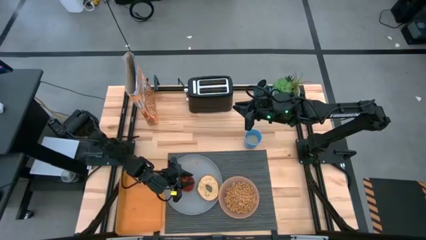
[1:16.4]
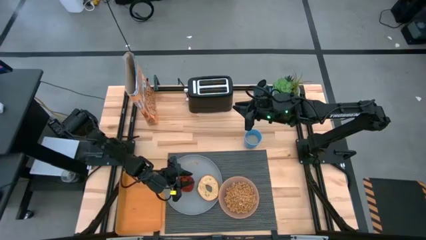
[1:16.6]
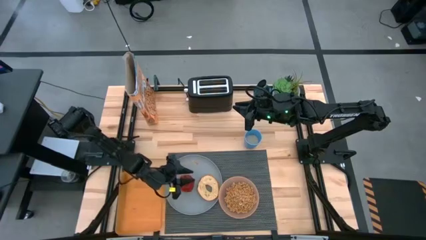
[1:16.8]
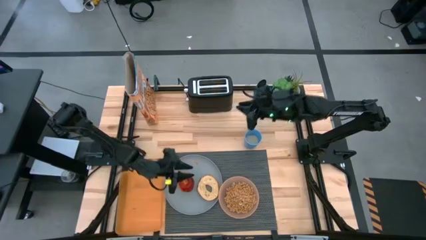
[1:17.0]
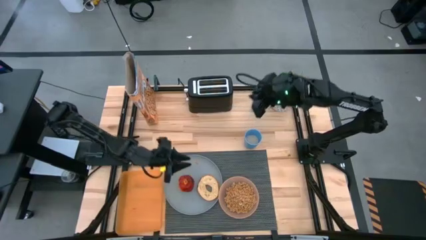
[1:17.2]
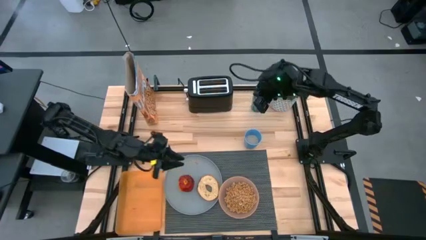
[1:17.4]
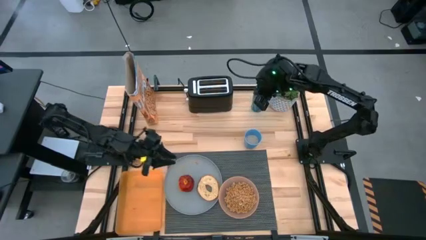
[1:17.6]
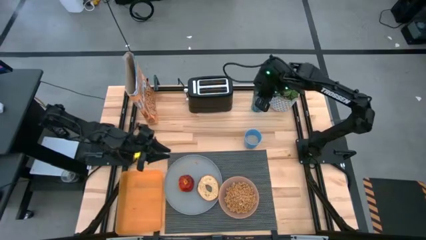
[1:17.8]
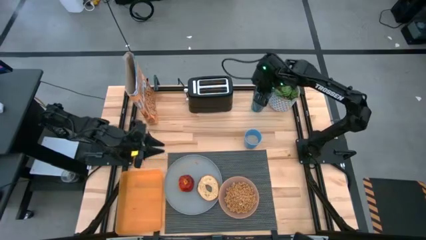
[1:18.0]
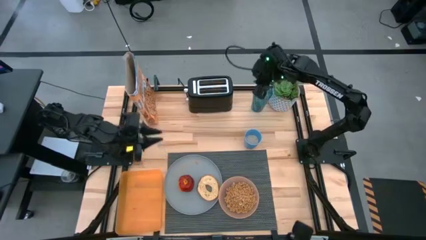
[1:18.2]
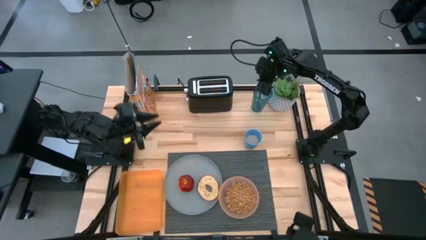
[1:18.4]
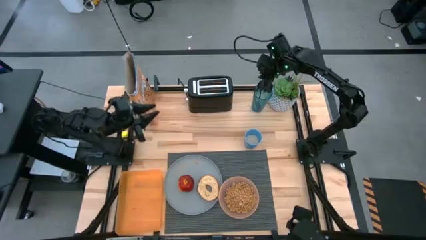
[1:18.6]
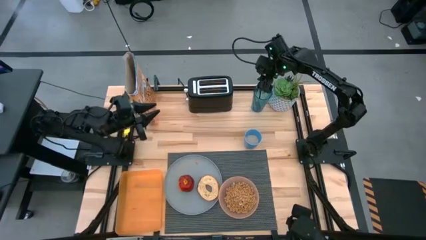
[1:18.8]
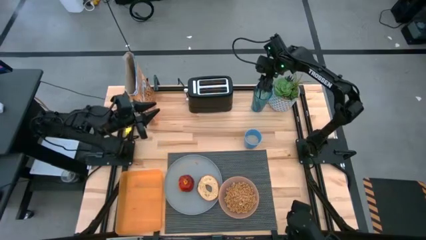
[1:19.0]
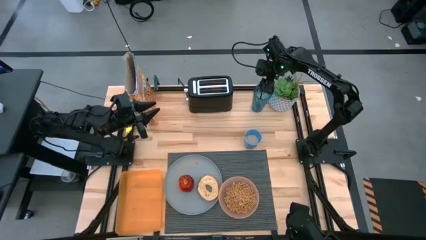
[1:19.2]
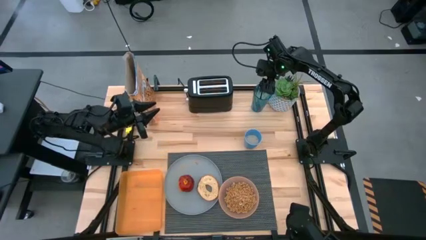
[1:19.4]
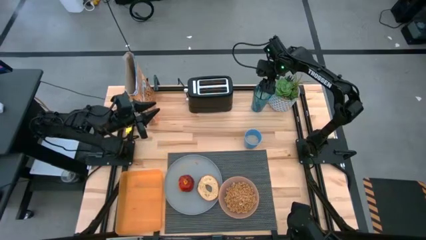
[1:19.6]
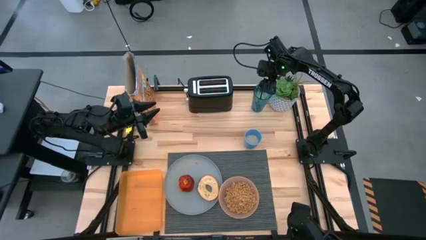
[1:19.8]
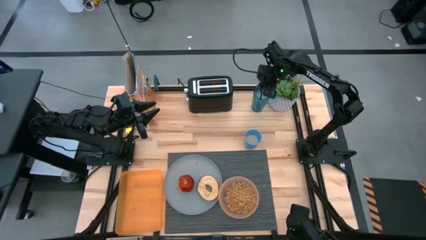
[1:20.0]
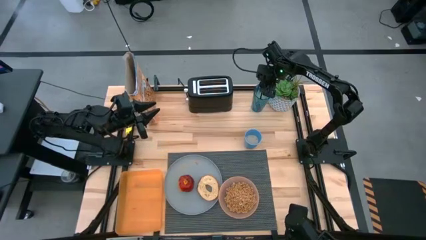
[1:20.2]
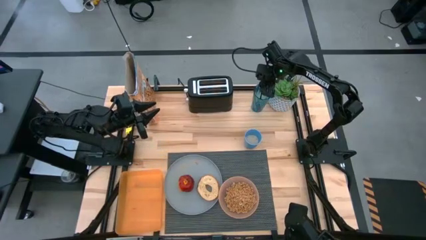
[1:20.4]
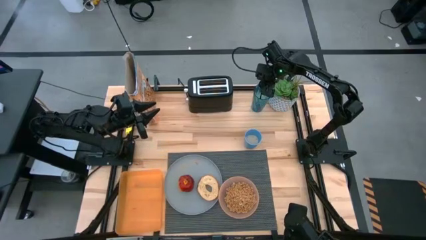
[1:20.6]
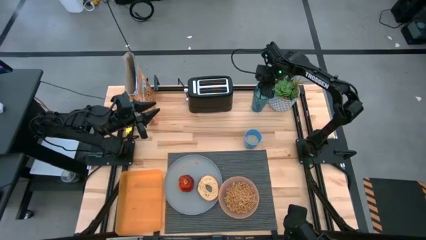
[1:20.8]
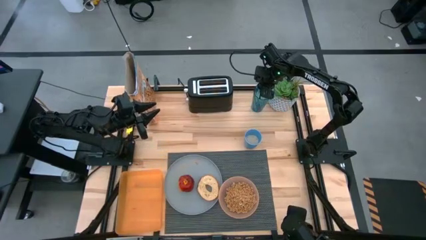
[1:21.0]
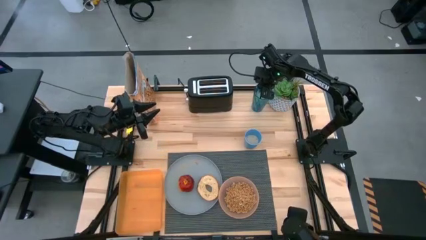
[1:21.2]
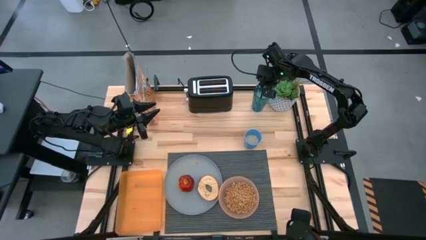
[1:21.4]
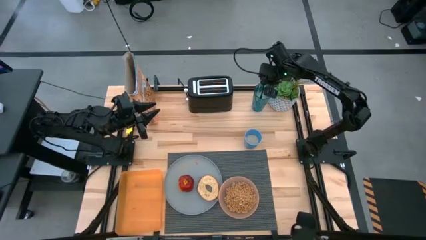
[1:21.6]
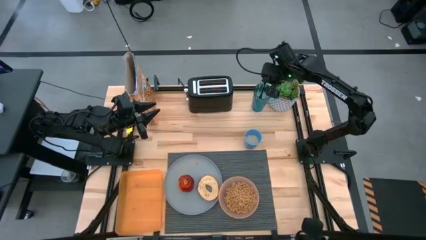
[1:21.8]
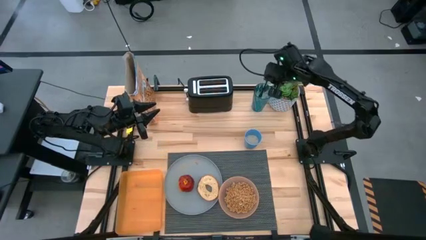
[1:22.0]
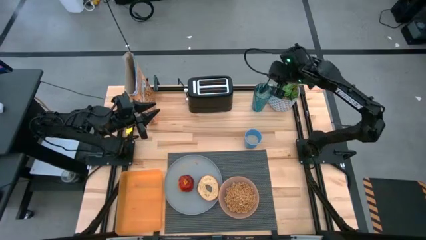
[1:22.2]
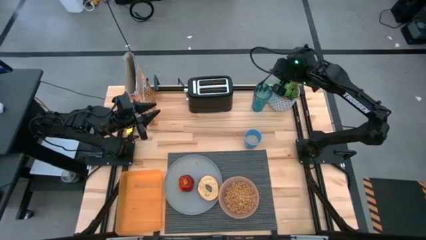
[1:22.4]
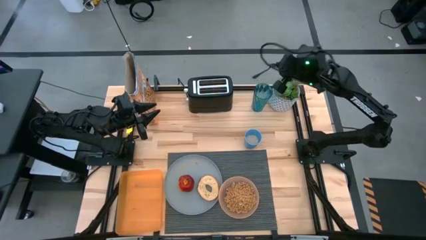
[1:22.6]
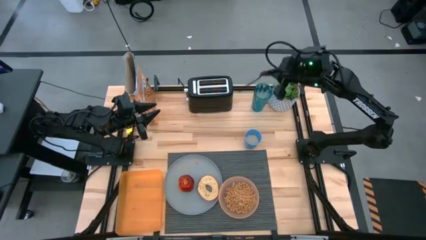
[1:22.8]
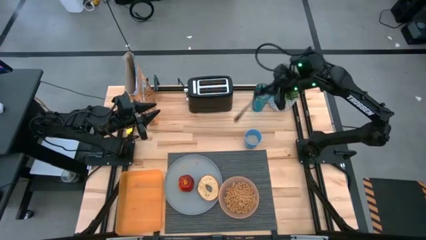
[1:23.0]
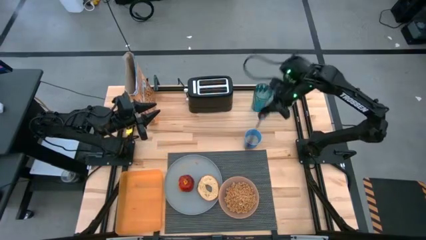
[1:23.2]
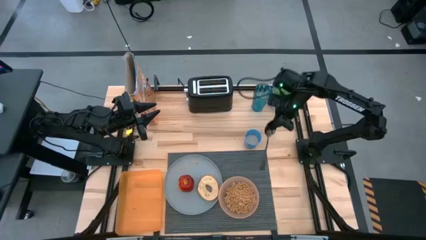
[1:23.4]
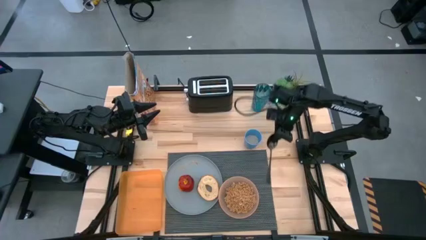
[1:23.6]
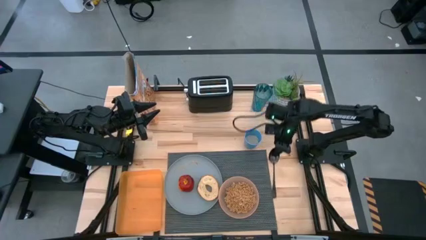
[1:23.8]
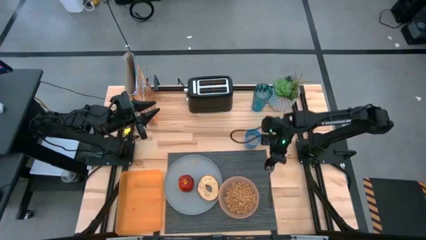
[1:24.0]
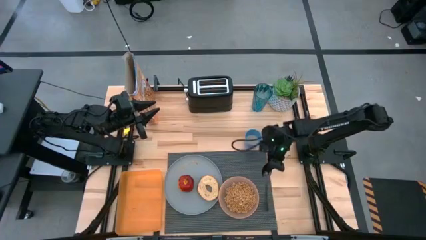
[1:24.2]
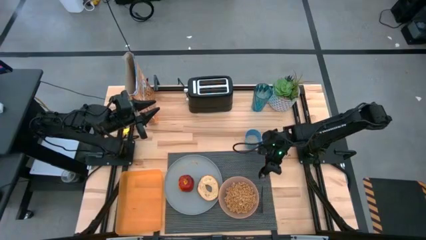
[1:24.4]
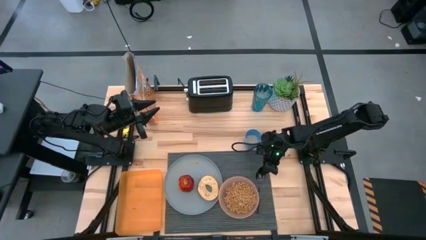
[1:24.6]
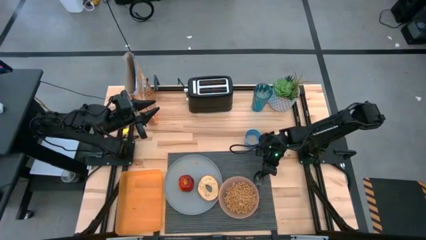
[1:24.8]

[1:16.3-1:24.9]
Task: Arrange a breakfast setting
Put the black spoon on the gray placemat to the right of the orange bowl

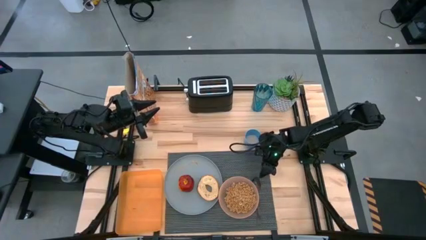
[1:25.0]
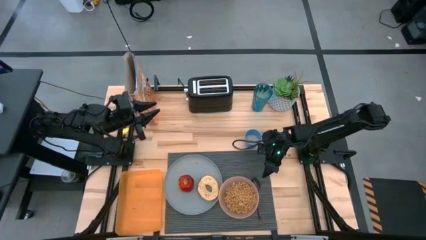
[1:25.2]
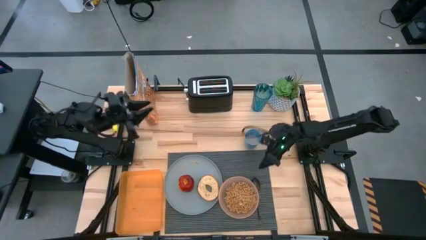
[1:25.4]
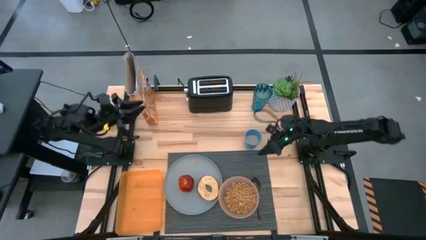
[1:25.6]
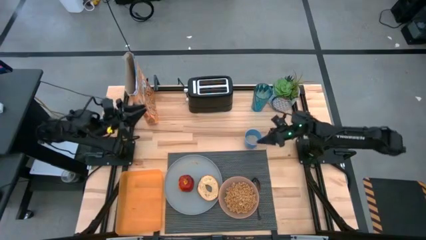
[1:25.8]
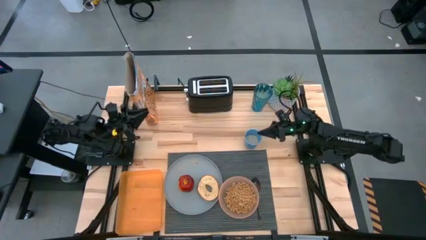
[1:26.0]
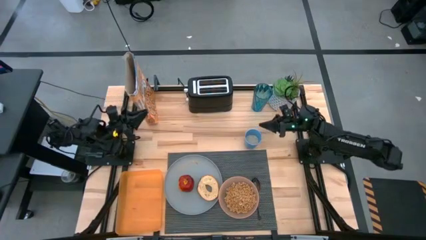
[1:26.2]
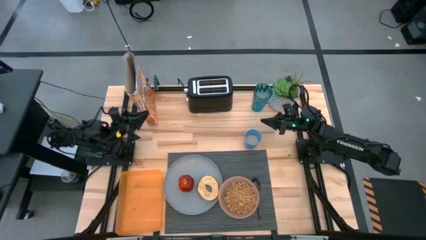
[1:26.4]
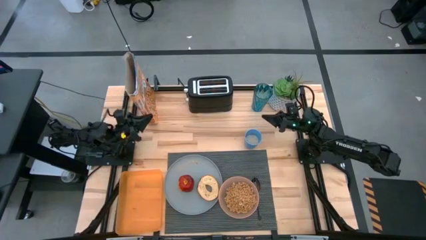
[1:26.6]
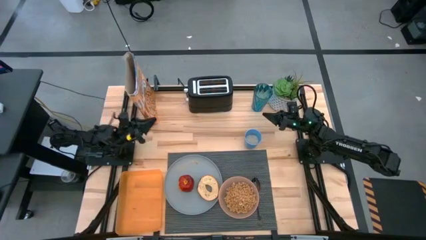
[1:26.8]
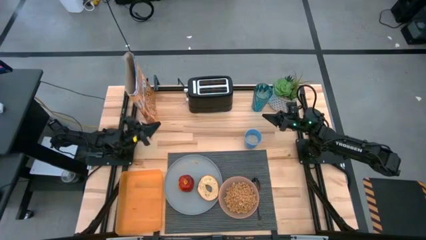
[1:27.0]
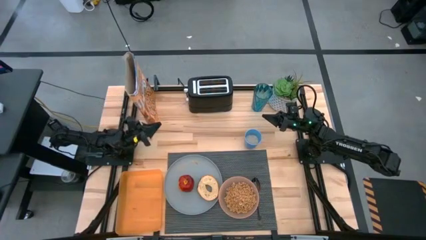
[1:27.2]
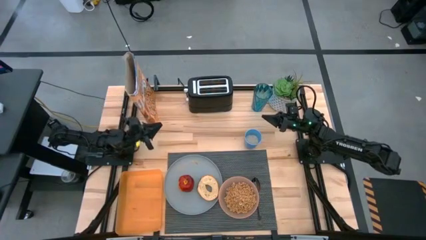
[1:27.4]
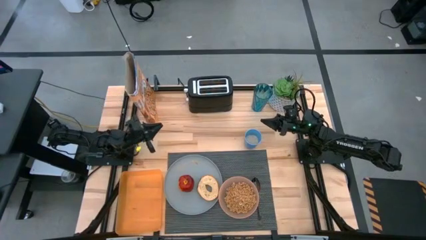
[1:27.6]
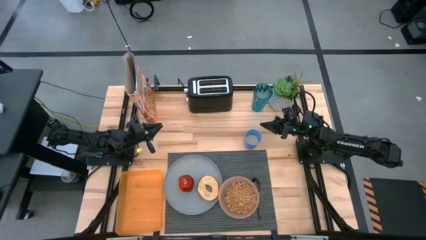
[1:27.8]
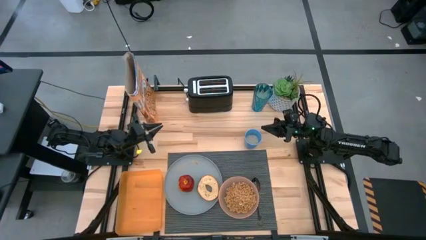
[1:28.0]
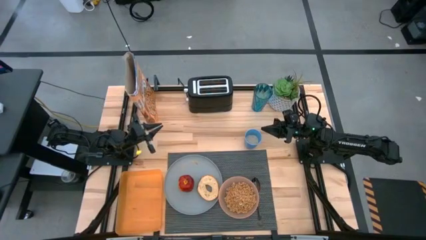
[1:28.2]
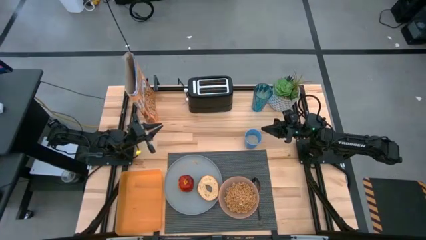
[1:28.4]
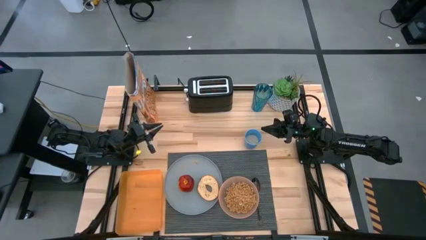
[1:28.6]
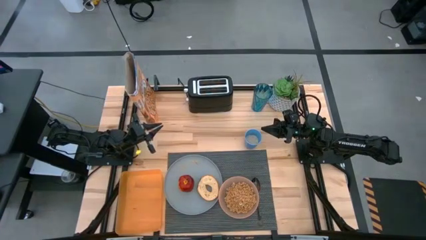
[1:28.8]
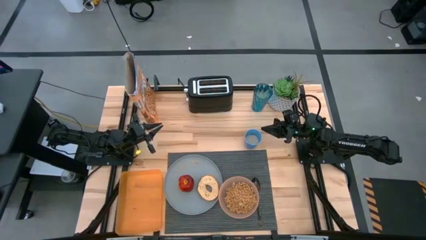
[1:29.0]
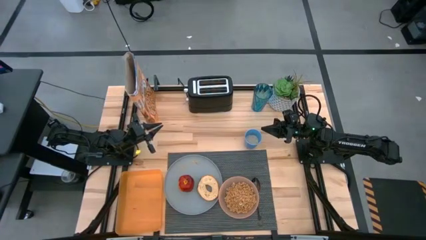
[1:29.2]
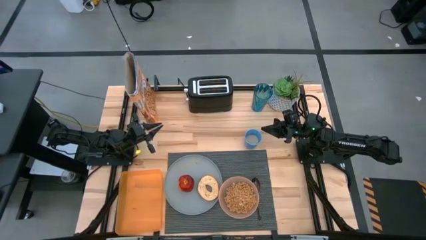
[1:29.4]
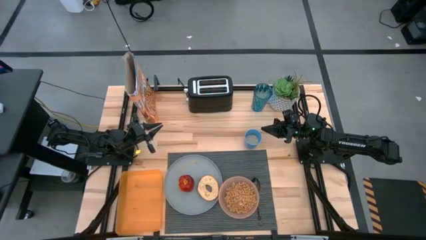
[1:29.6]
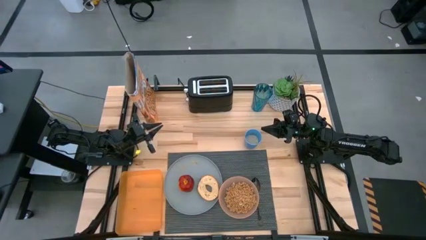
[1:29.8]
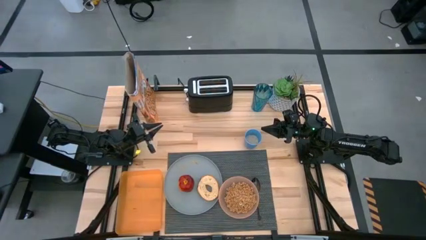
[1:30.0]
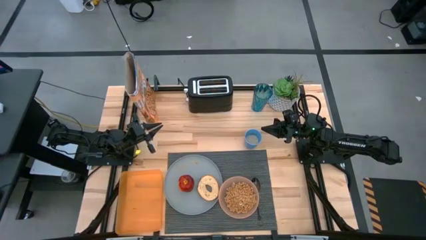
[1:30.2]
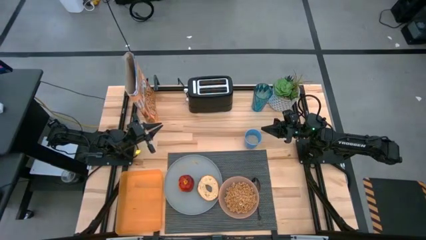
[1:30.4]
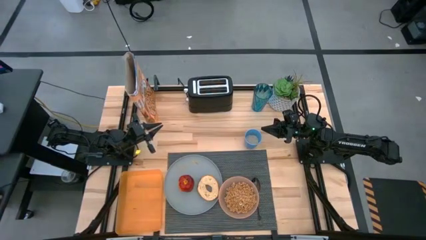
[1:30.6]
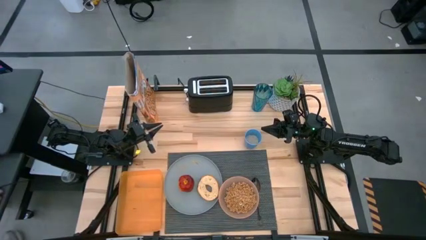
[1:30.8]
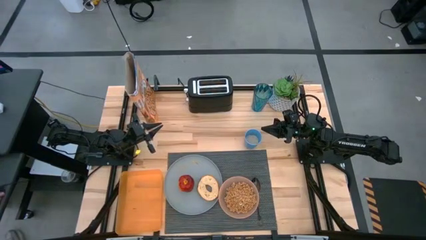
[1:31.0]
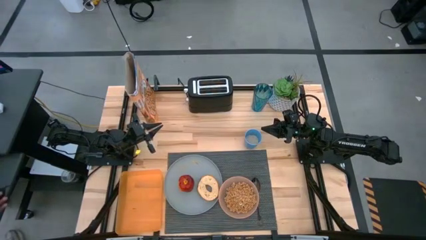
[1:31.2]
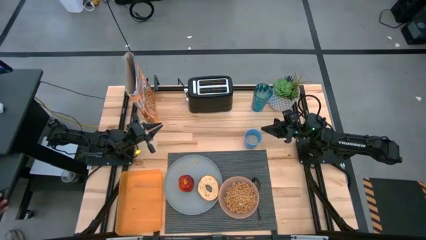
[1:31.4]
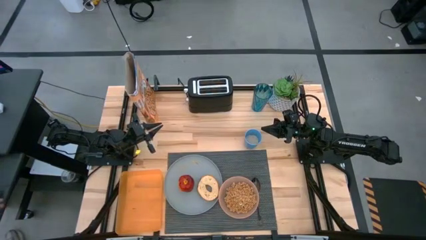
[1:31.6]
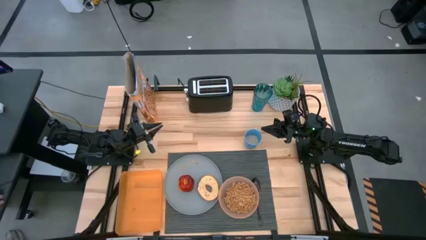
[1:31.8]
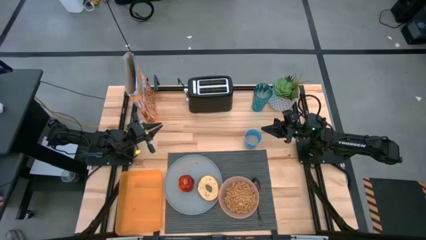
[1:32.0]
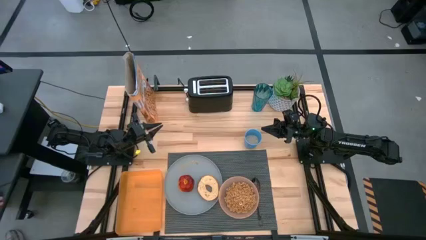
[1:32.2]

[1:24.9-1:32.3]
Return to Home Position

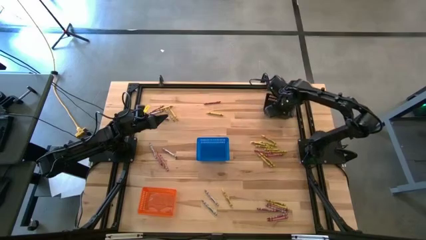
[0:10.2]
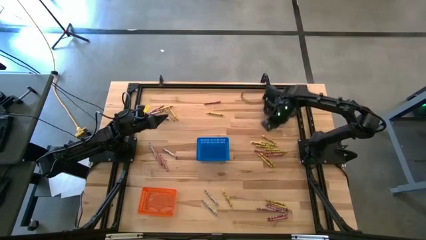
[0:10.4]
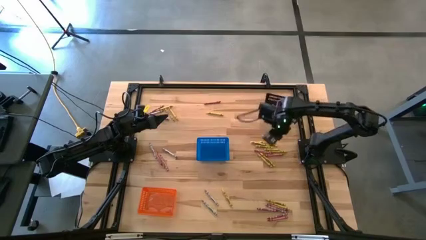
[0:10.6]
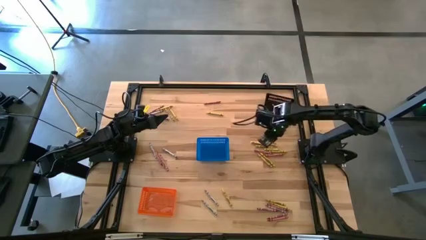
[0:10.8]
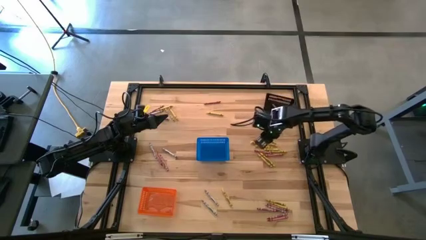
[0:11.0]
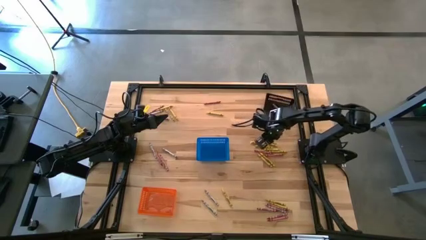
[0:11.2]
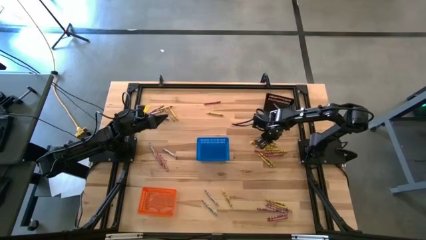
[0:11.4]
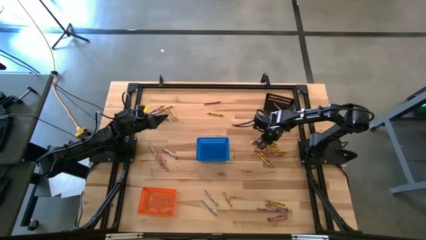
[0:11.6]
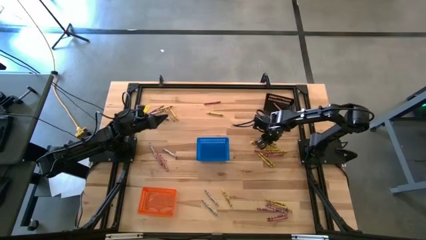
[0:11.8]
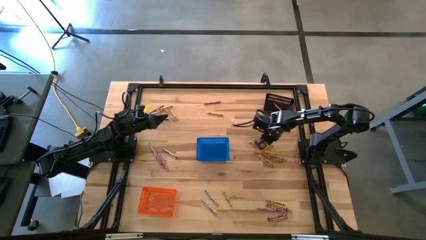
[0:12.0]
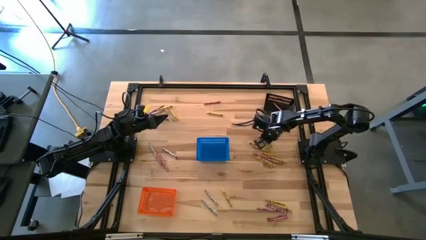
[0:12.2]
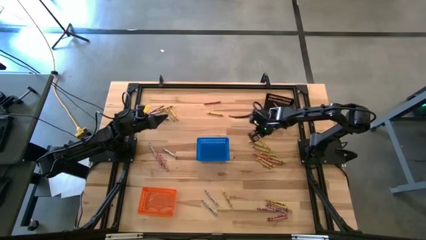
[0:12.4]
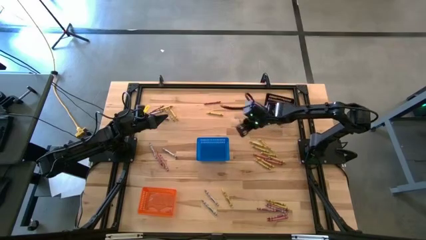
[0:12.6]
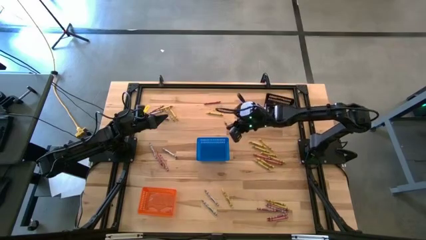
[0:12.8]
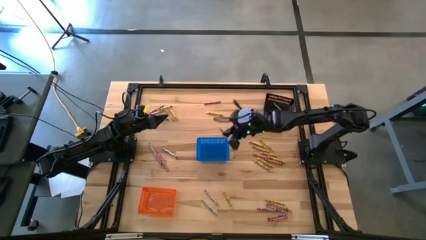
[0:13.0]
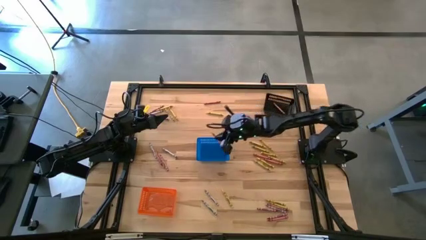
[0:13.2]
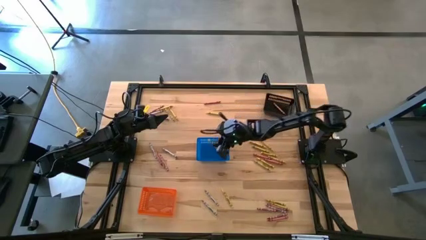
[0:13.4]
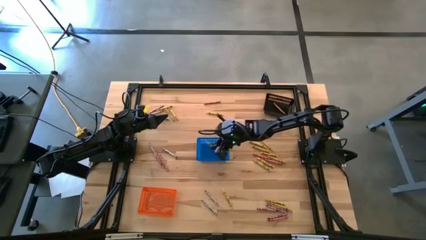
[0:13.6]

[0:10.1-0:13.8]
Task: Sort crayons
Put the yellow crayon into the blue basket
